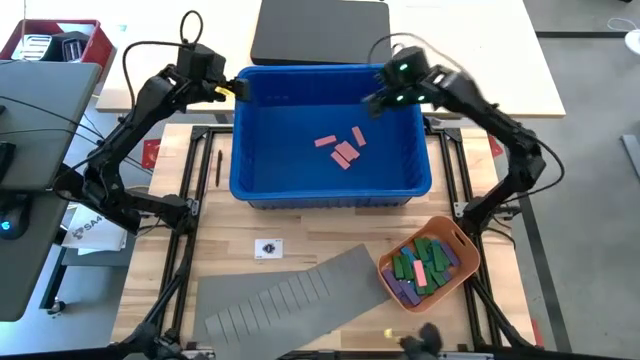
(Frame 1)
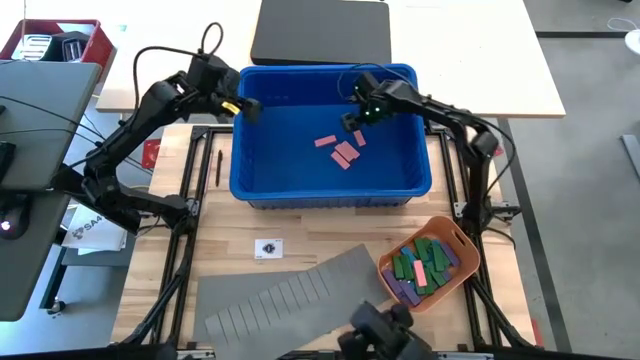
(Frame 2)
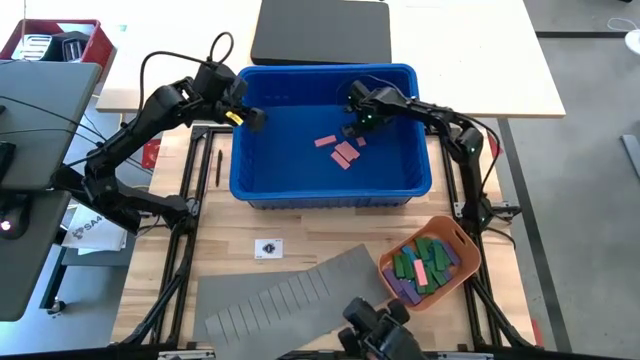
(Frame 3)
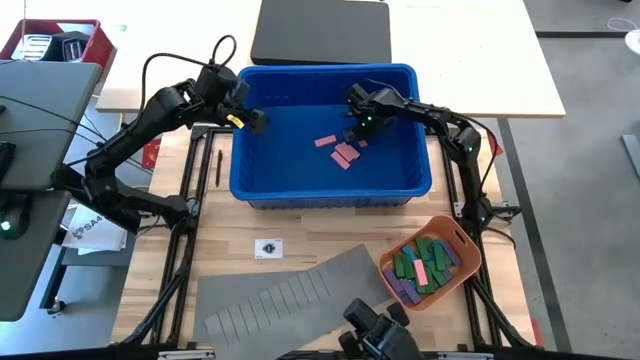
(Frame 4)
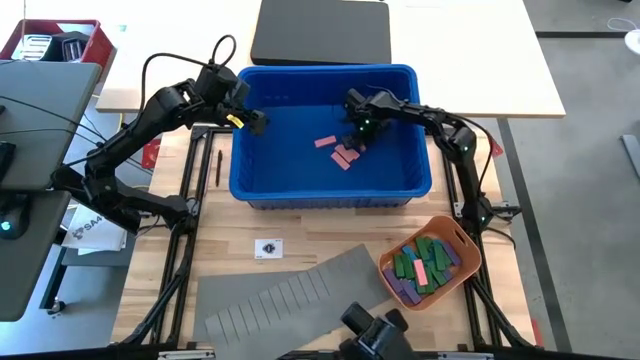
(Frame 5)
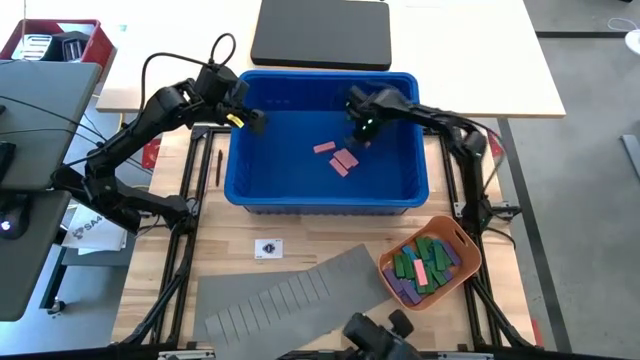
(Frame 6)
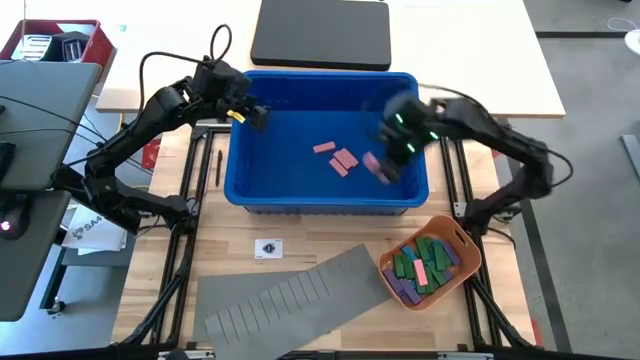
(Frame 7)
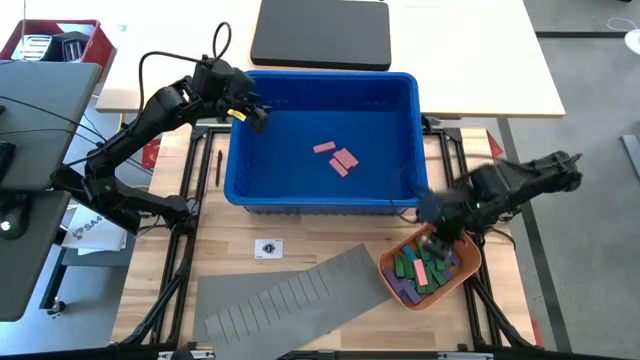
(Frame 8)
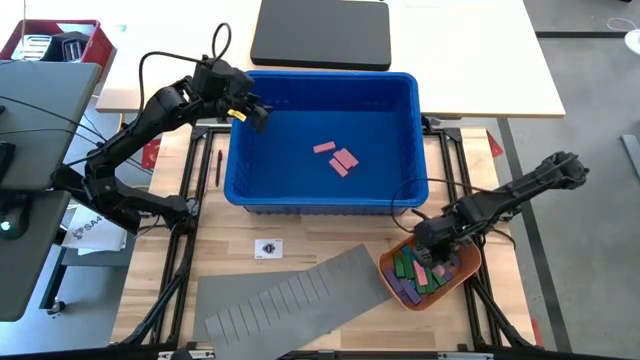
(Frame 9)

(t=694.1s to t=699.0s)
Task: Sort blocks
Put the pink block into the orange bin

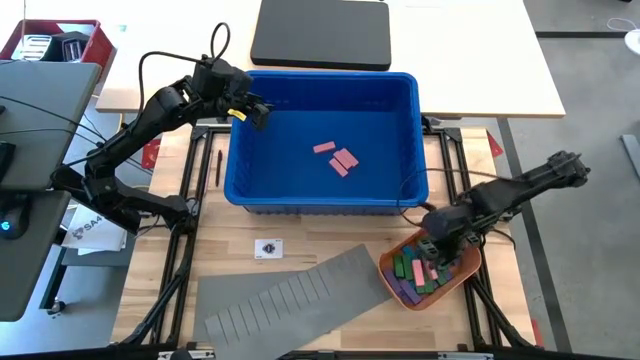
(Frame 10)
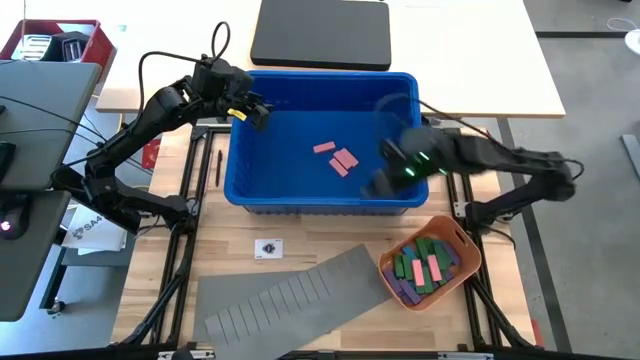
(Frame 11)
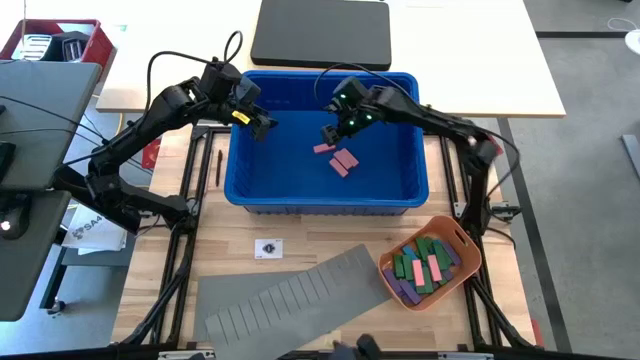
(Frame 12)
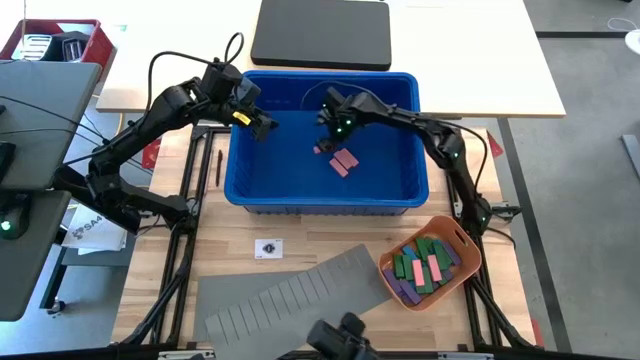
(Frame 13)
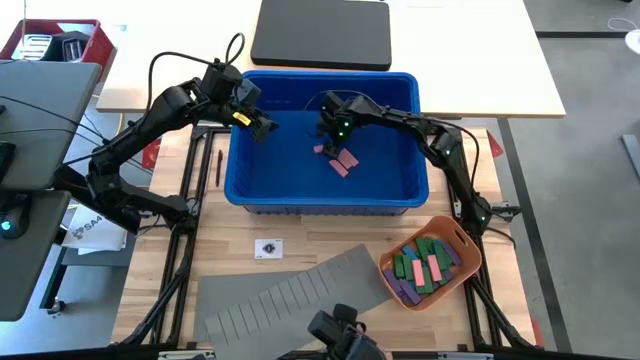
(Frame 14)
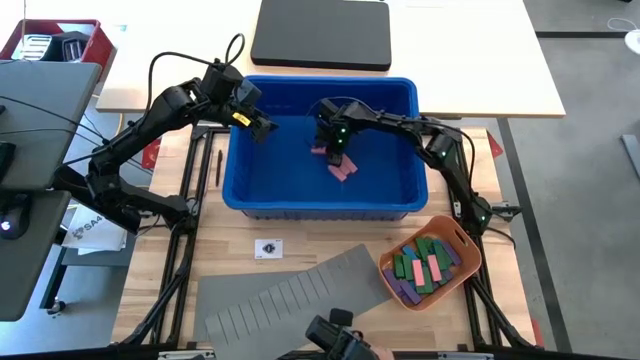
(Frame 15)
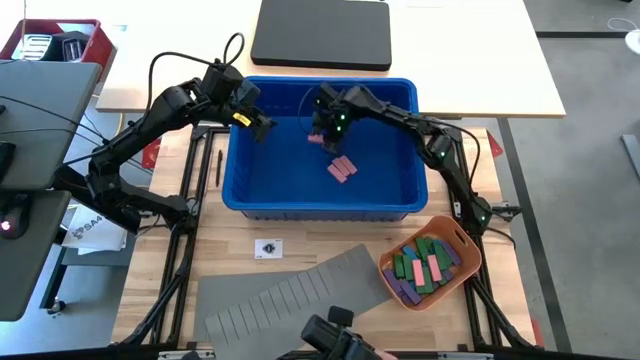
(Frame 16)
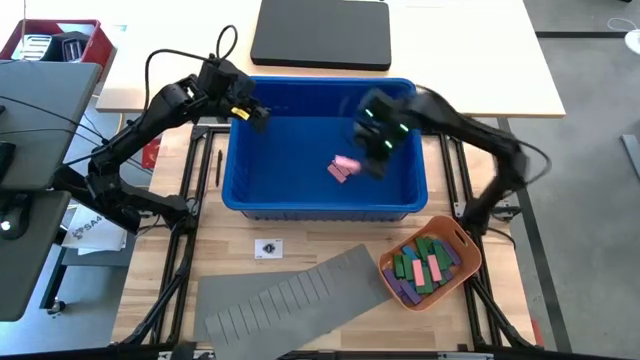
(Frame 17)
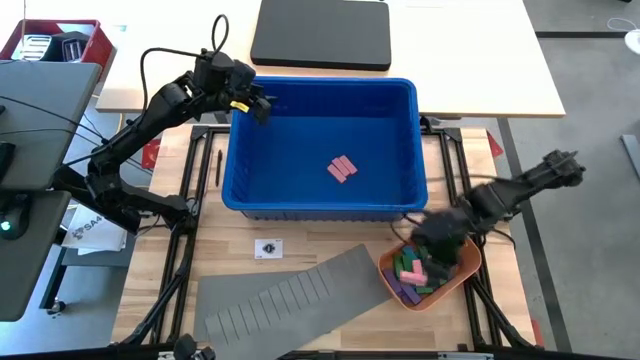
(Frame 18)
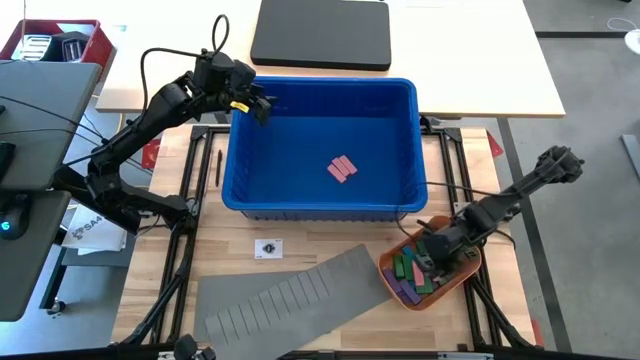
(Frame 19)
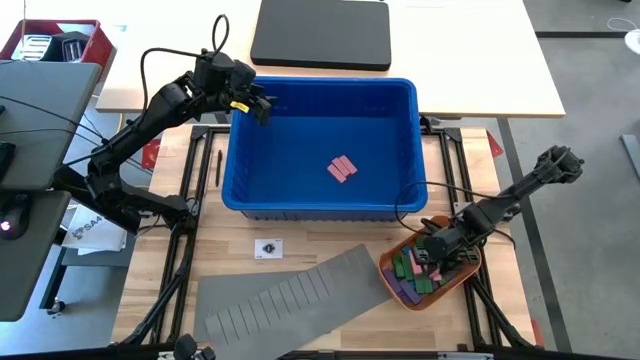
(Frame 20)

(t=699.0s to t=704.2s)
Put the pink block into the orange bin

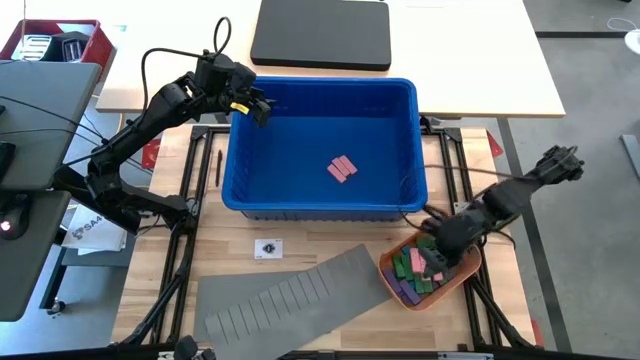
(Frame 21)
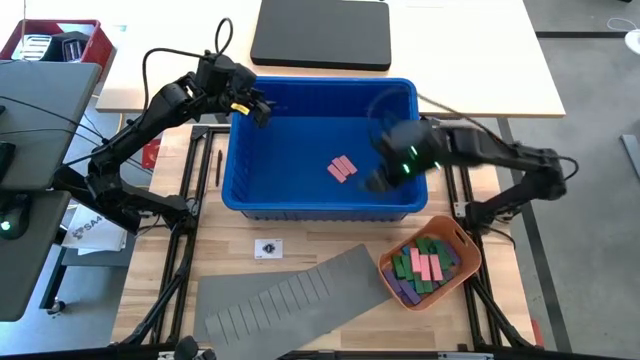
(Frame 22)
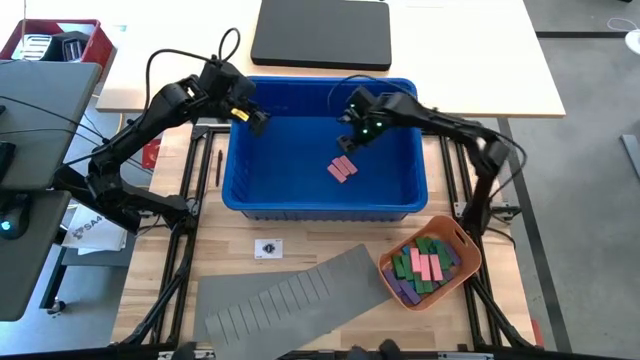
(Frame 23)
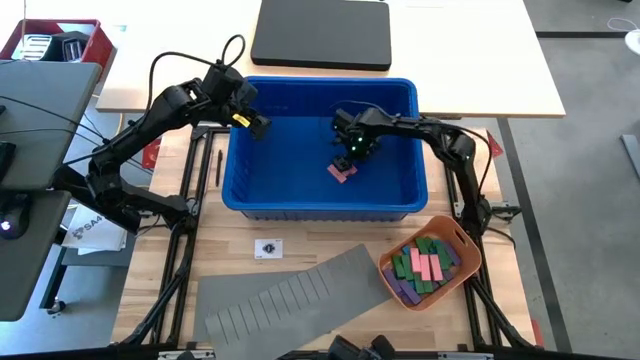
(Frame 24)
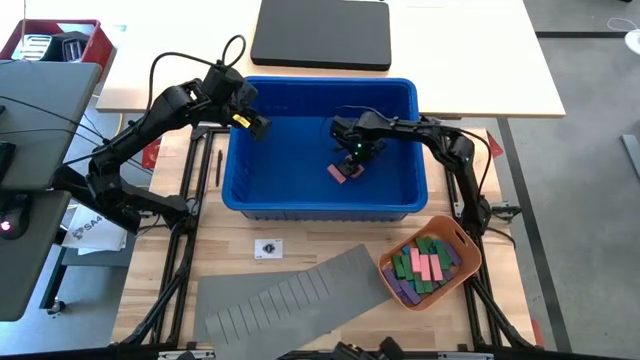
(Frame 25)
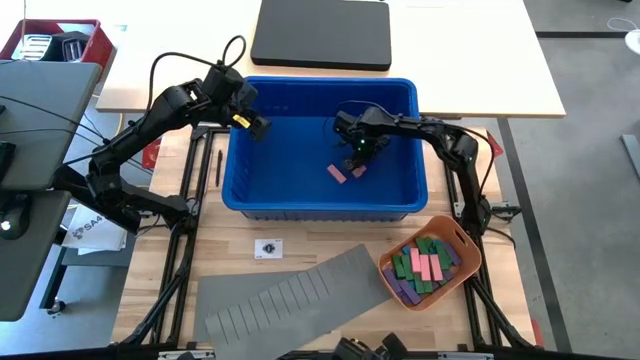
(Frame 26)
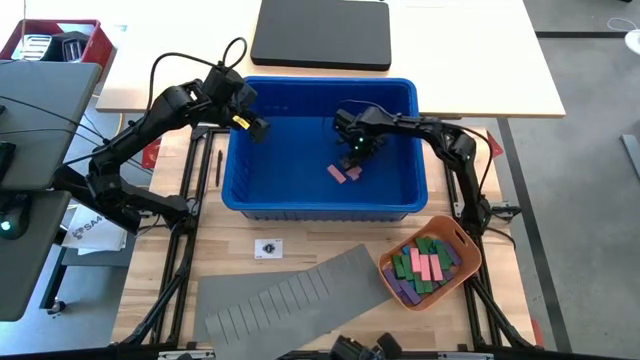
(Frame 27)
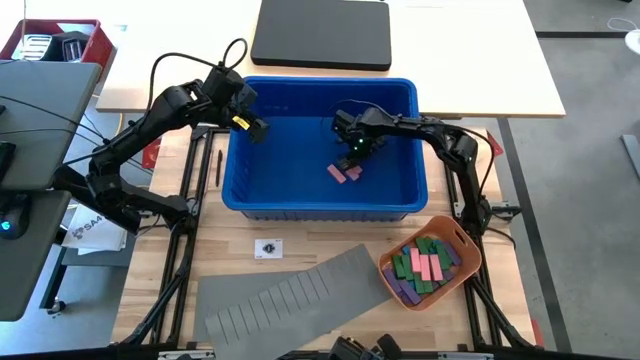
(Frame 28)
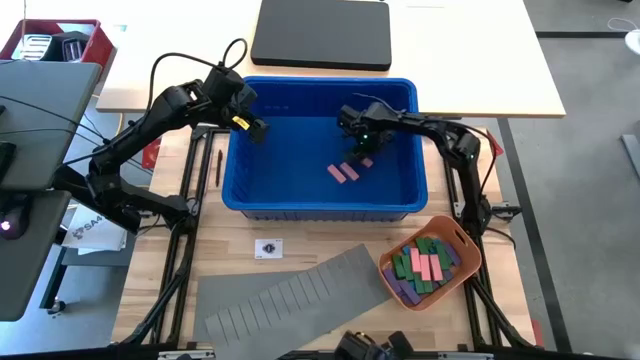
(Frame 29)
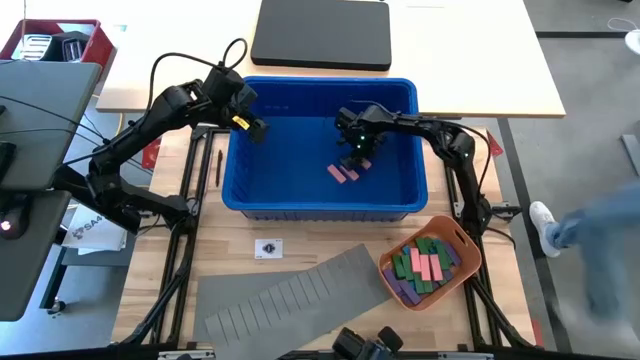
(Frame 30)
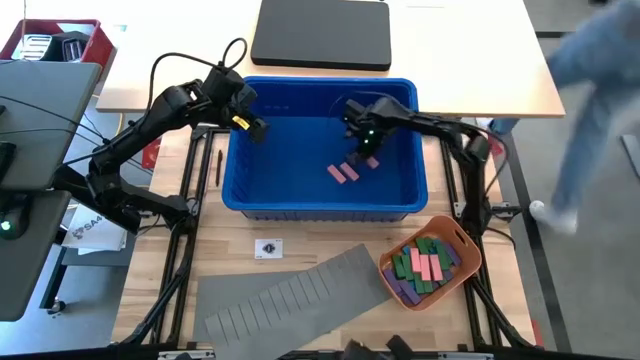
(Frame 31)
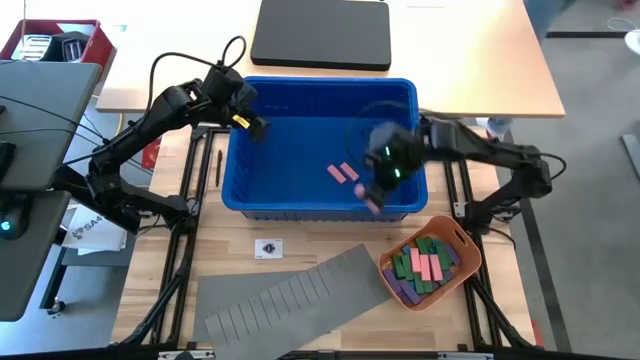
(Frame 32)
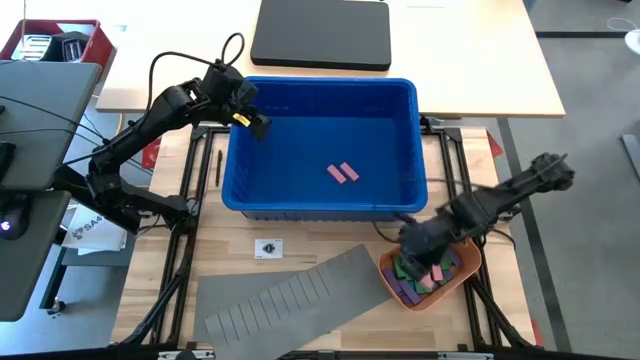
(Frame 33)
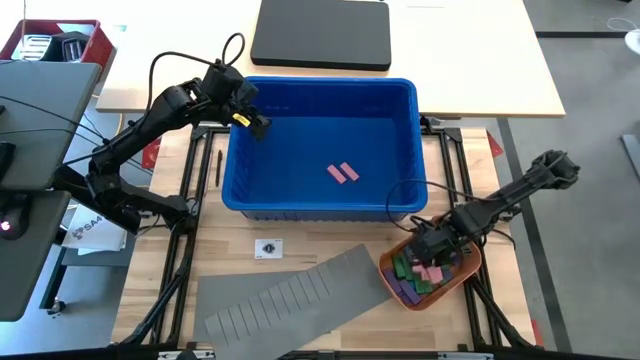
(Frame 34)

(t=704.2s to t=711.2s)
Put the pink block into the orange bin

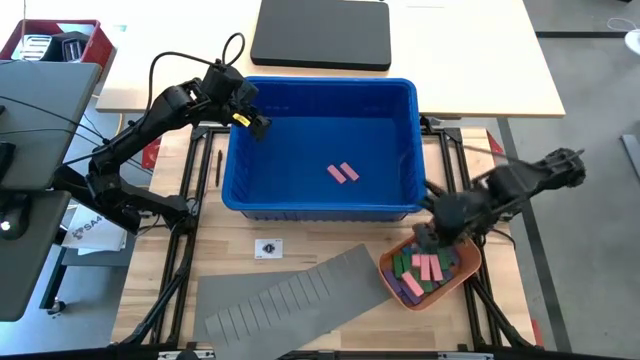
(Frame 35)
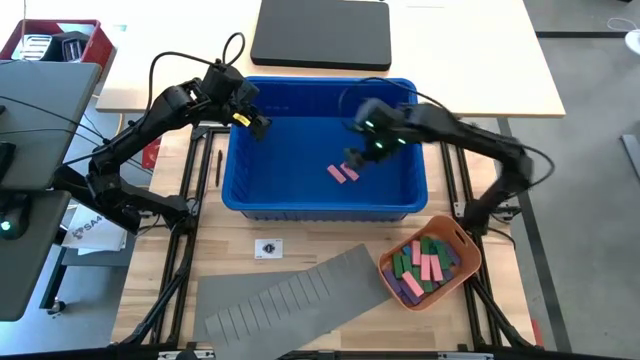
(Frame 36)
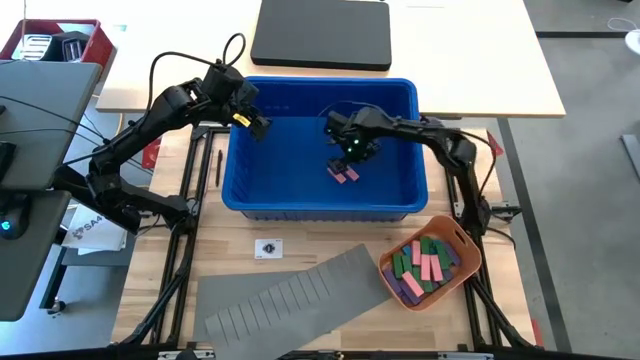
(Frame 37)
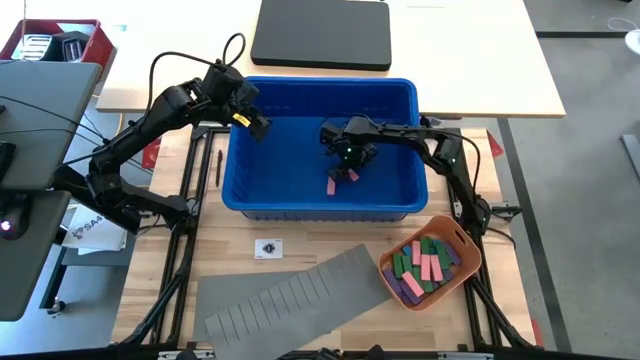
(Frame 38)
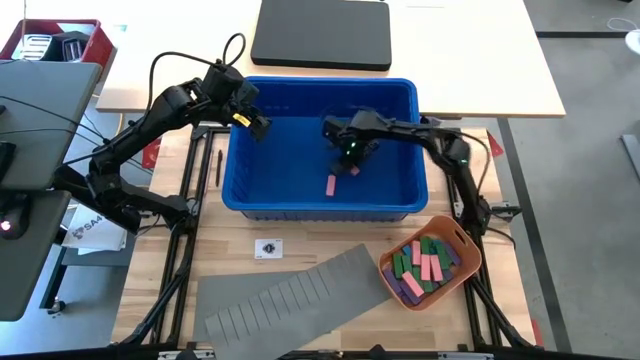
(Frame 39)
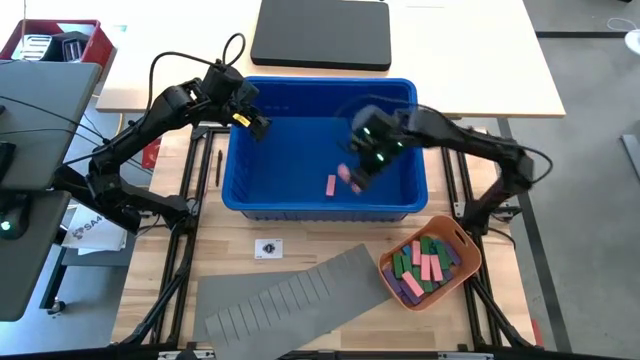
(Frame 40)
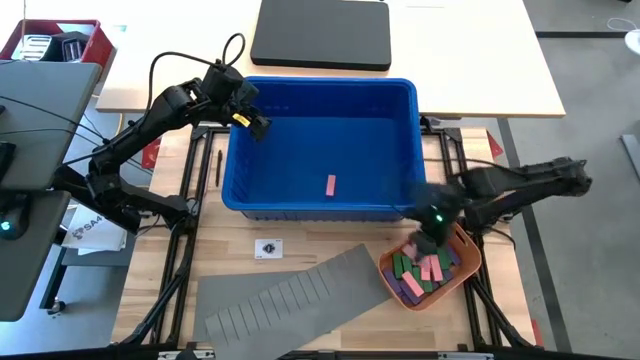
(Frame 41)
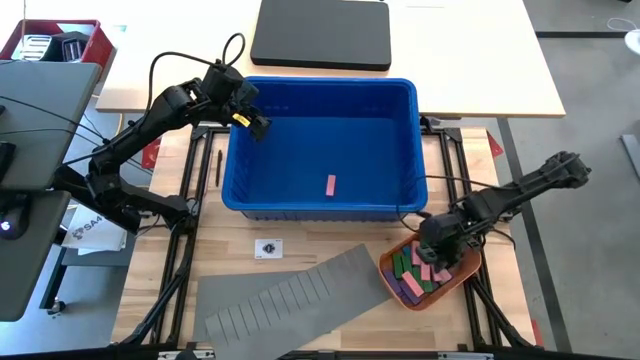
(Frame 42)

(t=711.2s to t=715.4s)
Put the pink block into the orange bin
